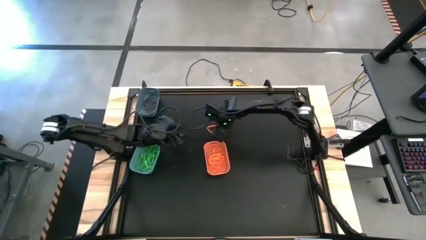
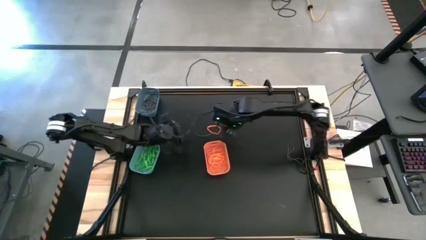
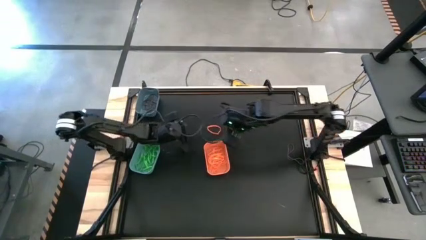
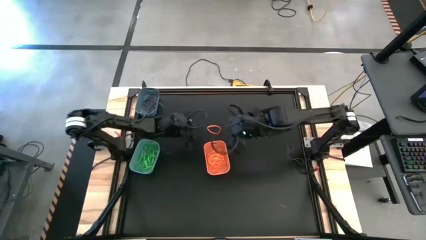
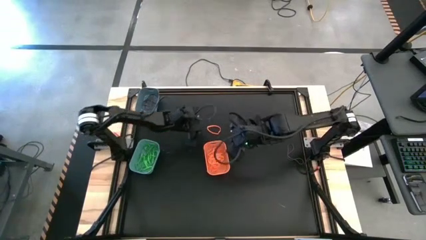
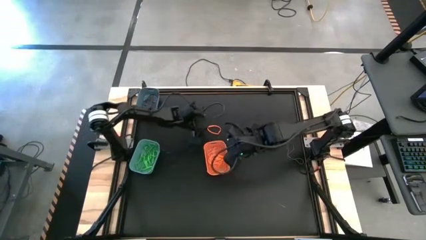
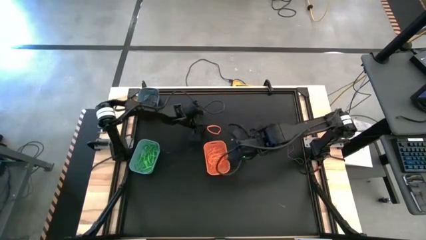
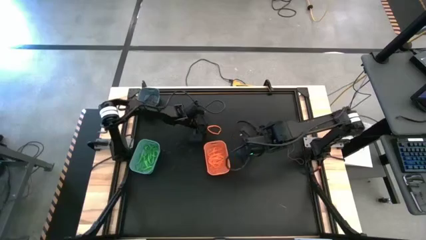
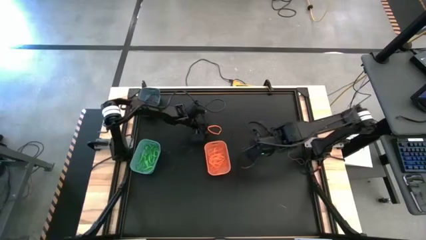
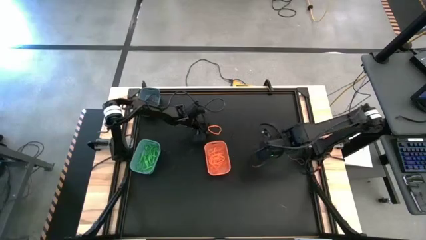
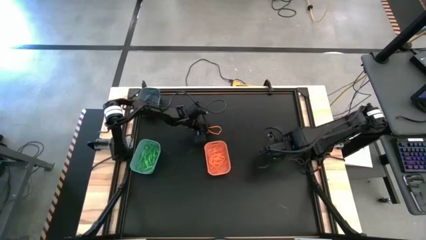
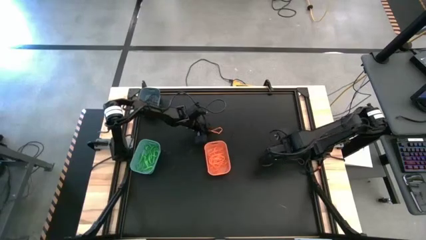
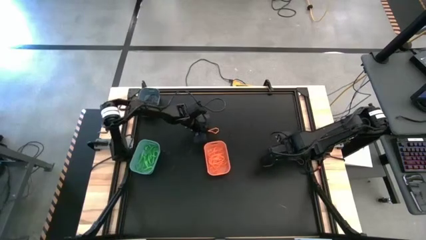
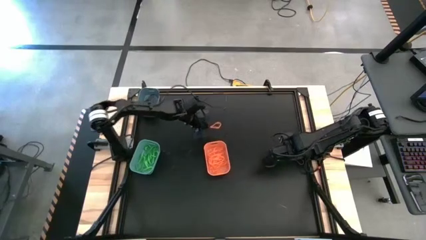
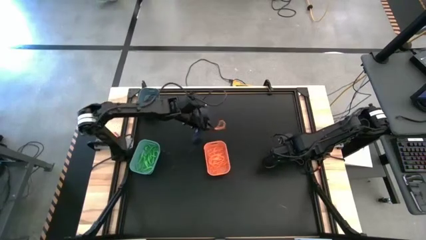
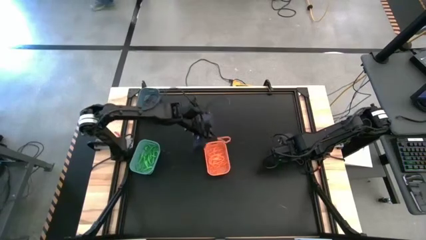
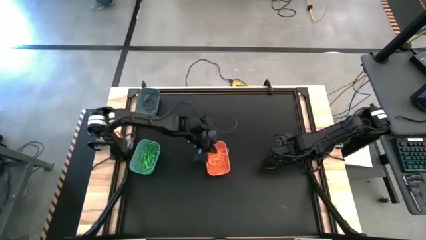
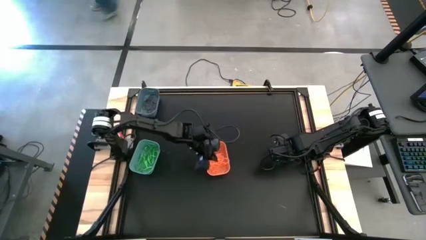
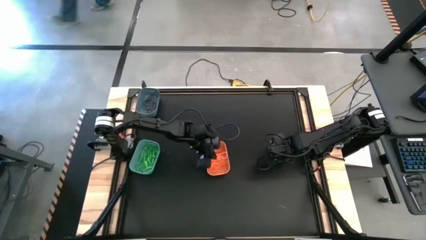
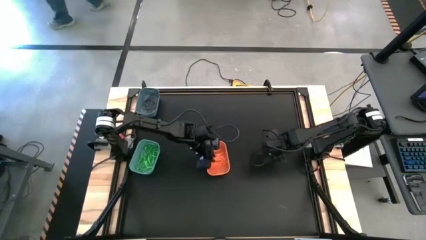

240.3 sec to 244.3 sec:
Task: Sort rubber bands into baskets
Put the orange rubber band into the orange bin

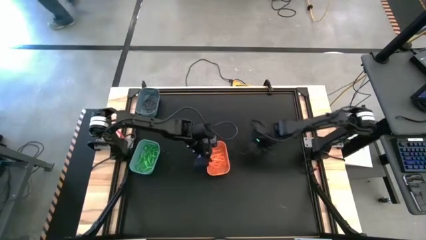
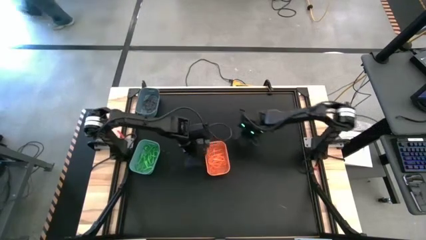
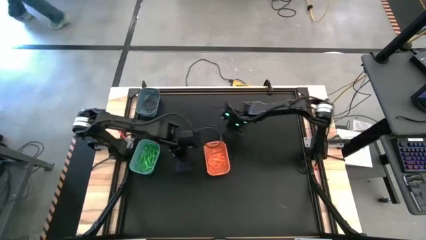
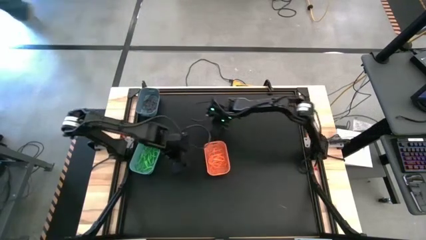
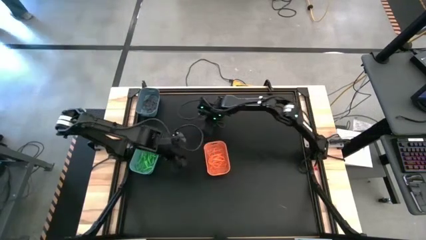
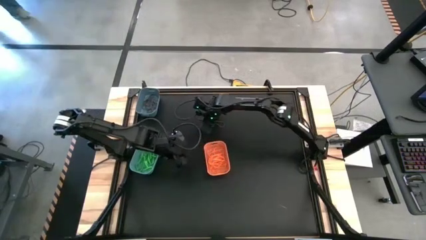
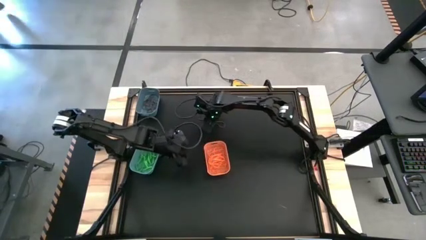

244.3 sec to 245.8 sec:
Move the purple rubber band

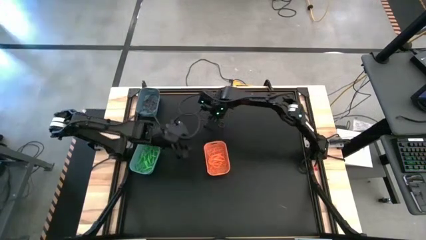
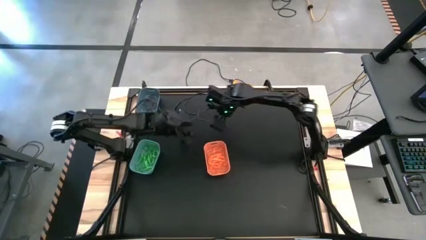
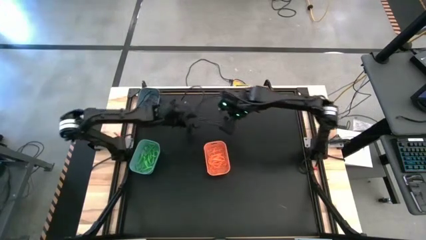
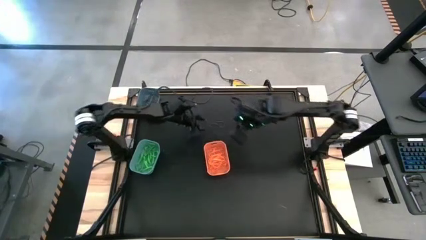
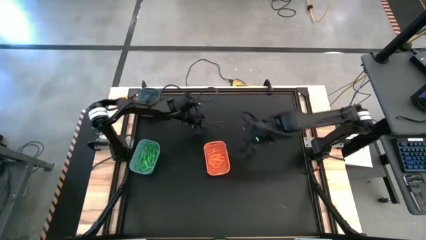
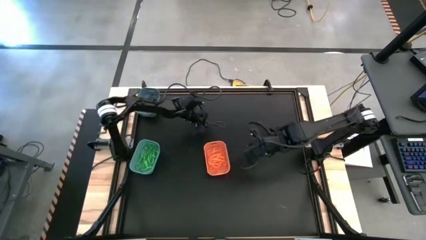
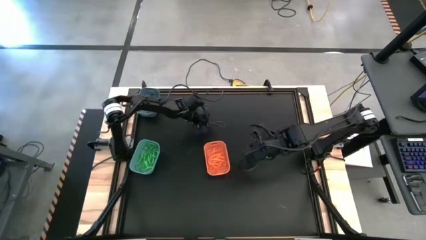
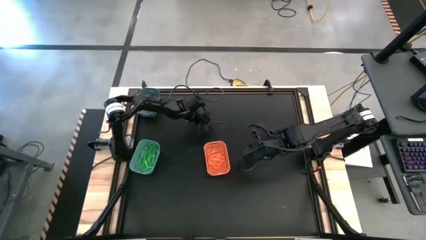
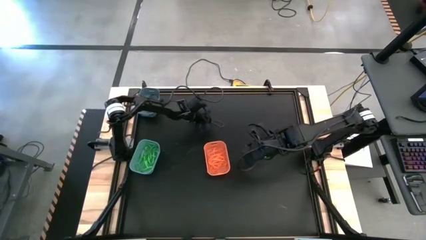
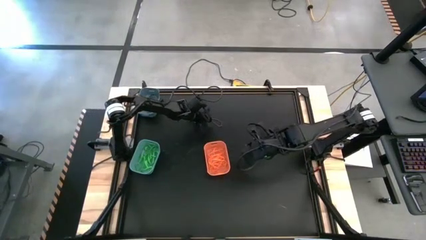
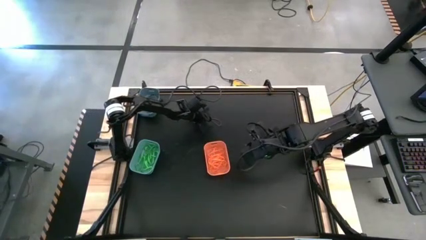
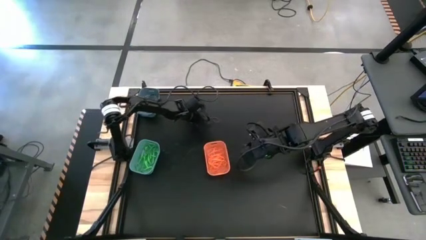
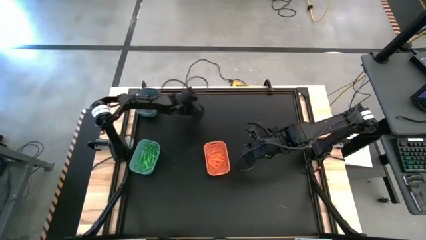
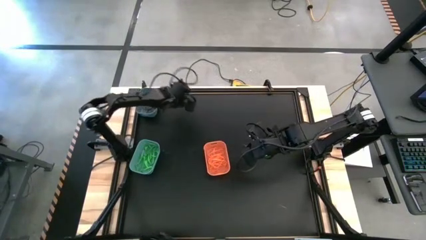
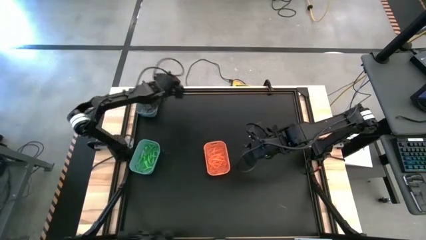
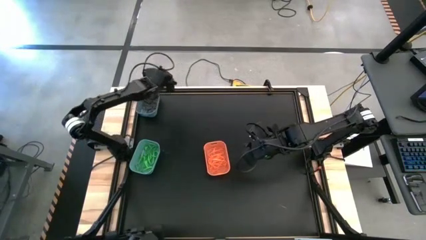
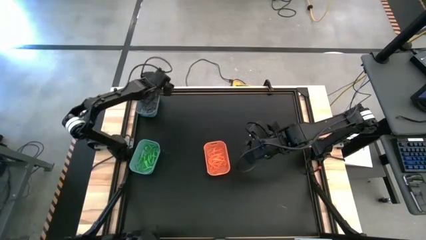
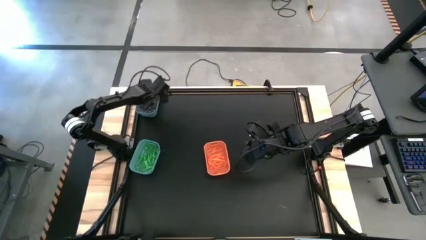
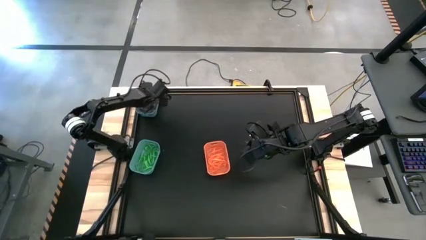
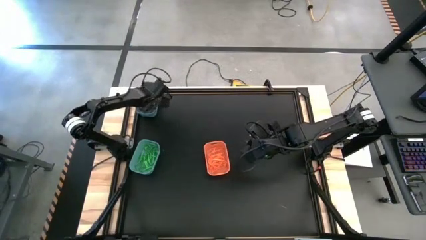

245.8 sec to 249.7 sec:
Put the purple rubber band into the sky blue bin

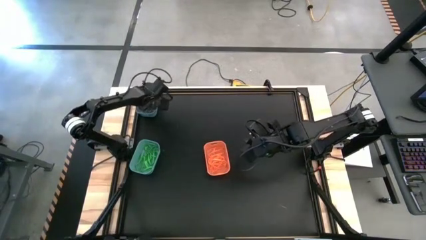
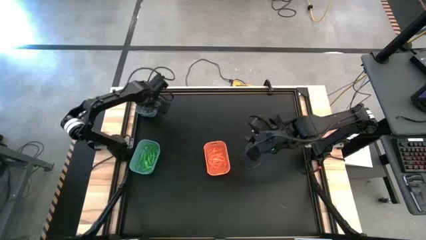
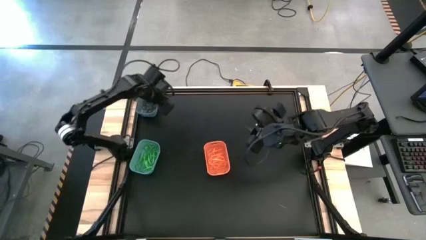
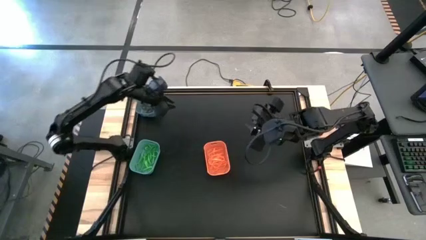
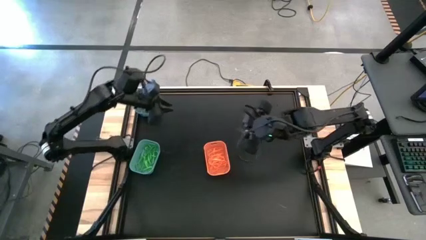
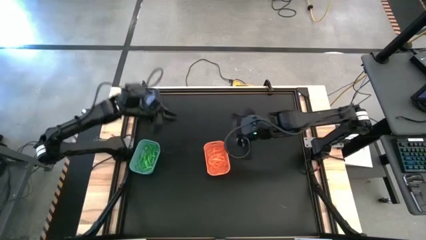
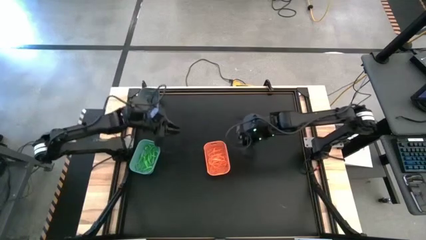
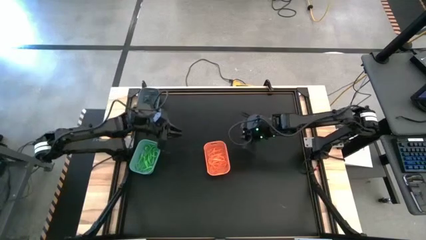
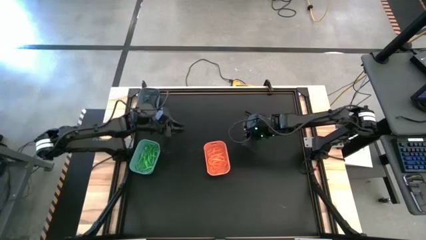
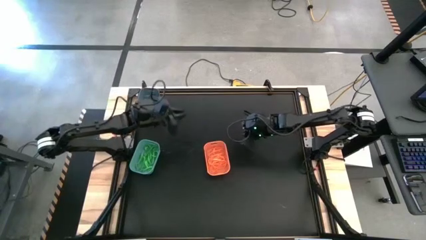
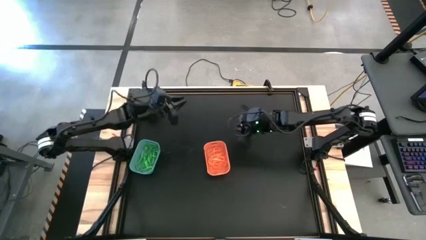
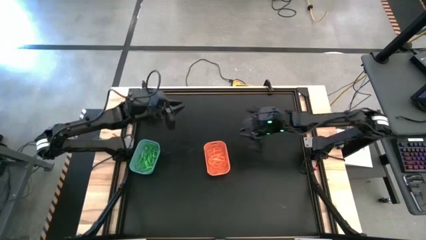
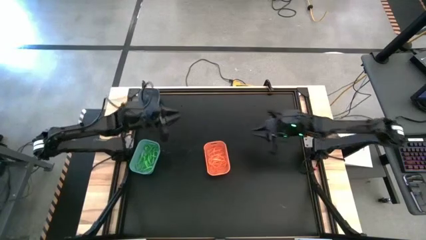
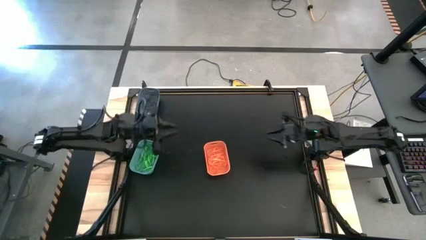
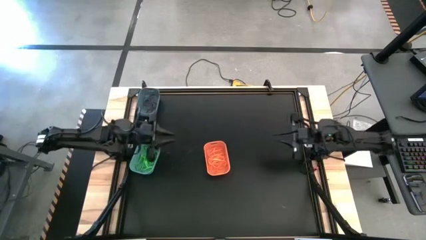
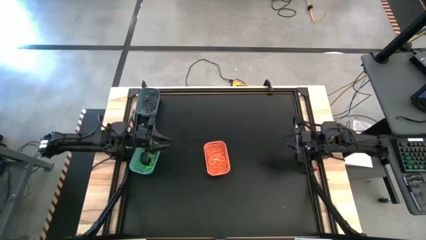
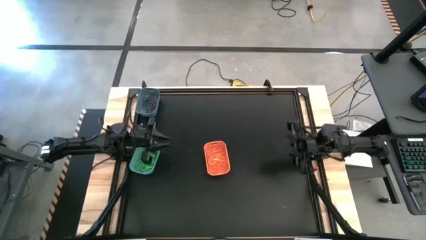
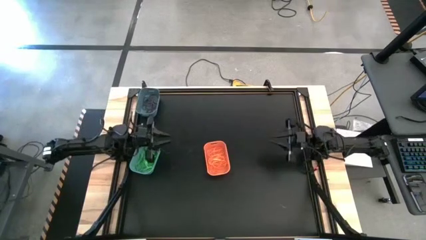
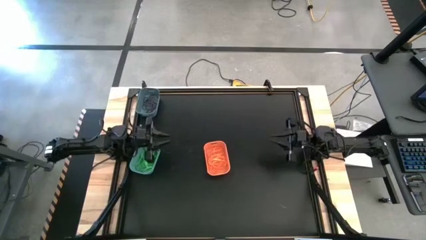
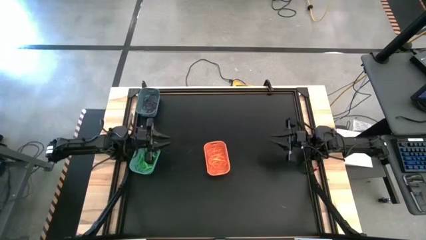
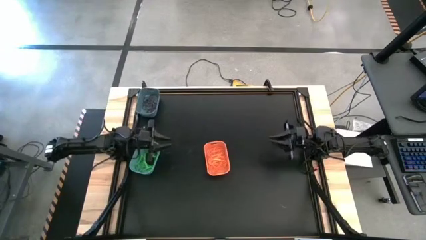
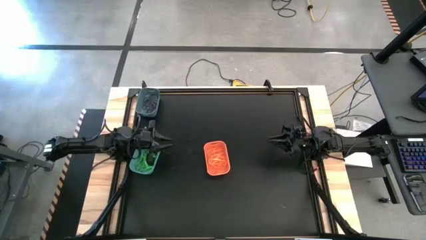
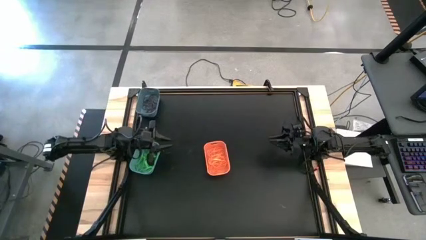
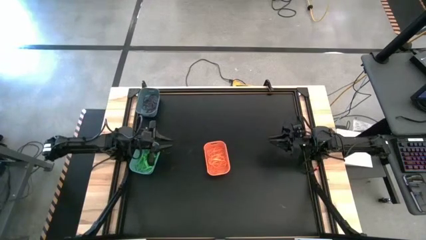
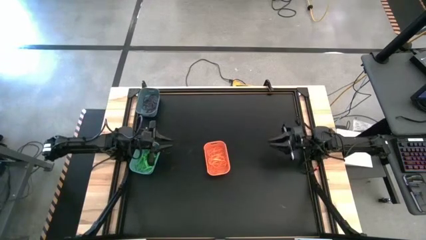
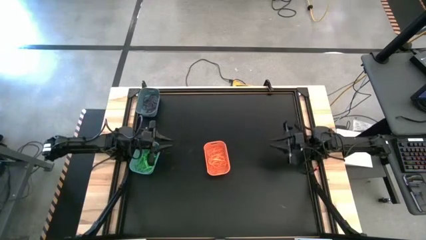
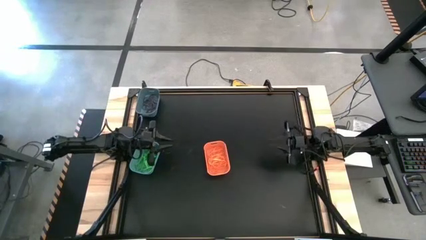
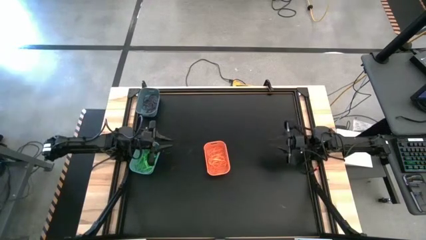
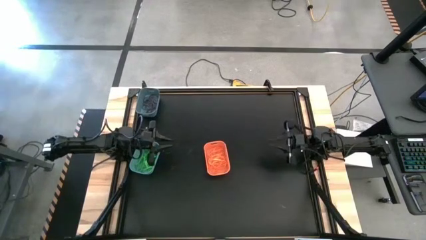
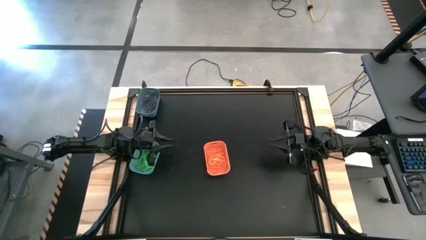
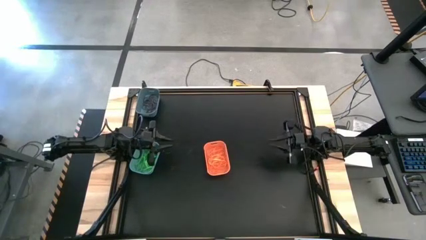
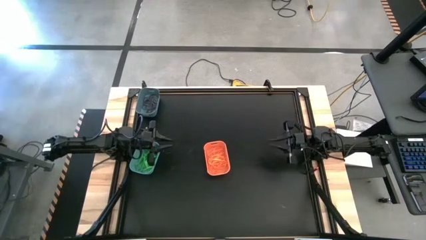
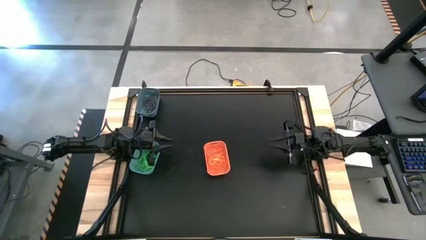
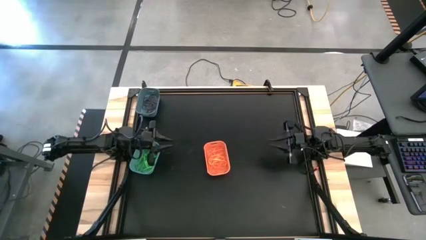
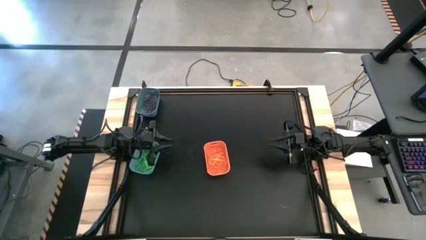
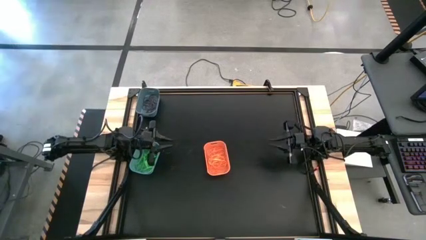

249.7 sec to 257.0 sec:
Return to Home Position
